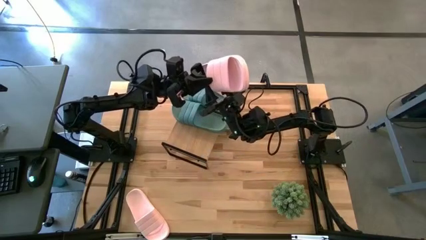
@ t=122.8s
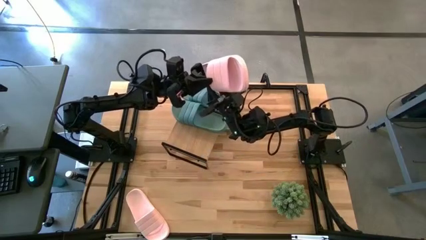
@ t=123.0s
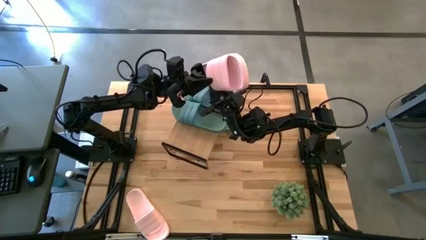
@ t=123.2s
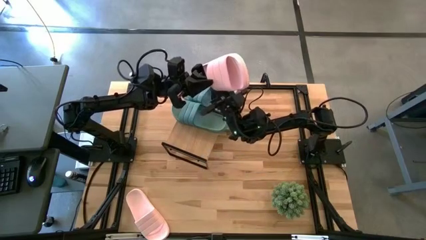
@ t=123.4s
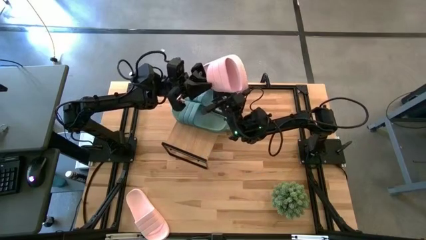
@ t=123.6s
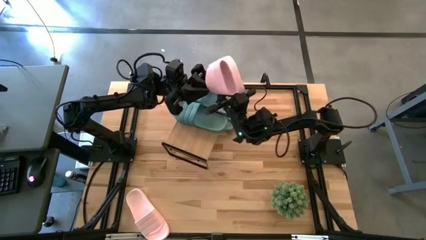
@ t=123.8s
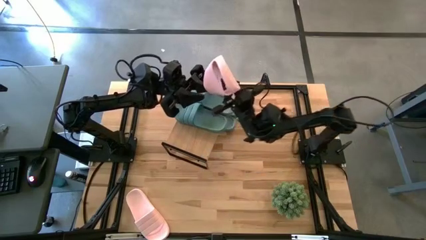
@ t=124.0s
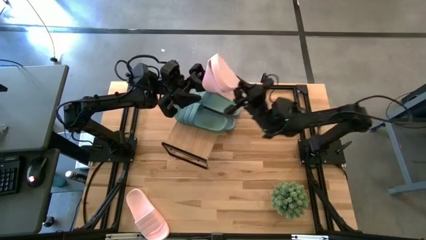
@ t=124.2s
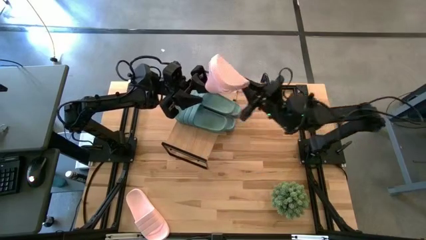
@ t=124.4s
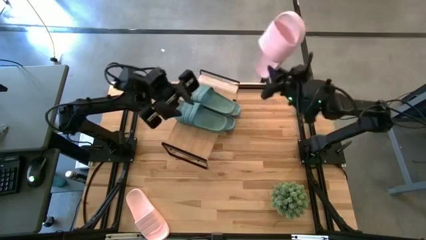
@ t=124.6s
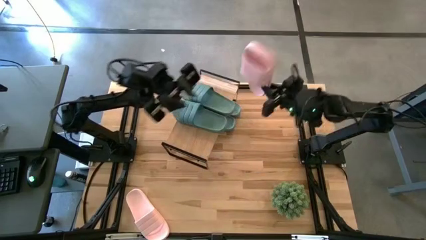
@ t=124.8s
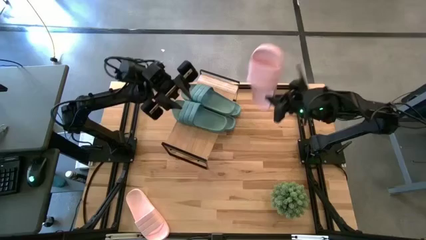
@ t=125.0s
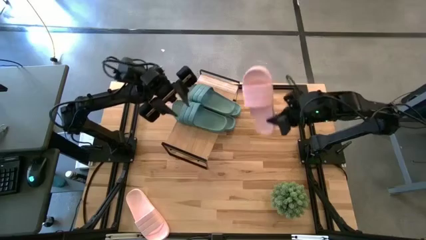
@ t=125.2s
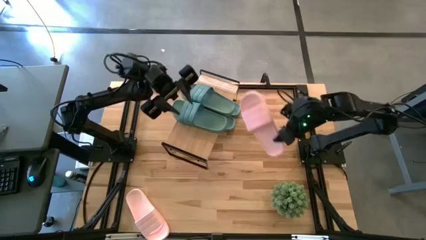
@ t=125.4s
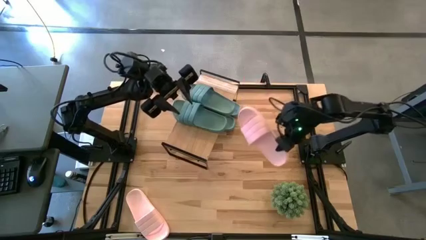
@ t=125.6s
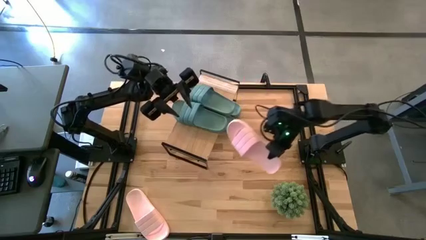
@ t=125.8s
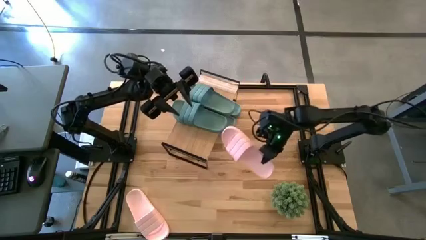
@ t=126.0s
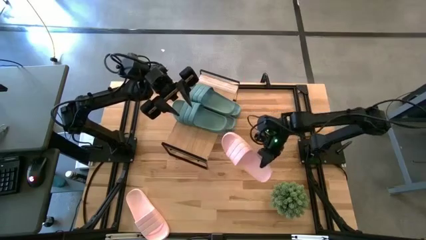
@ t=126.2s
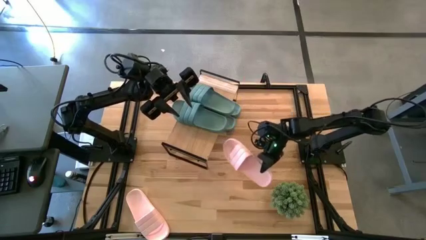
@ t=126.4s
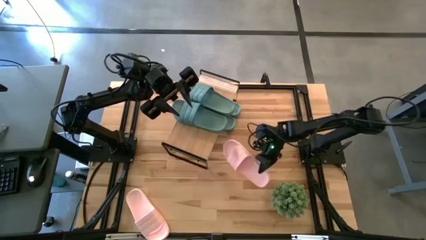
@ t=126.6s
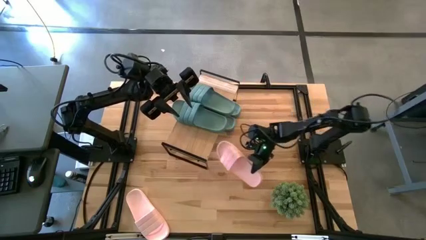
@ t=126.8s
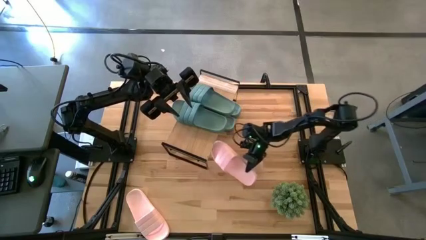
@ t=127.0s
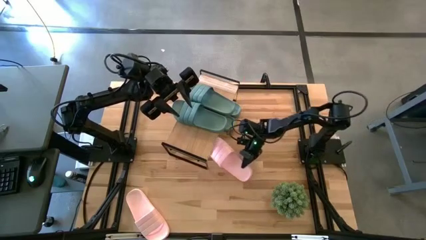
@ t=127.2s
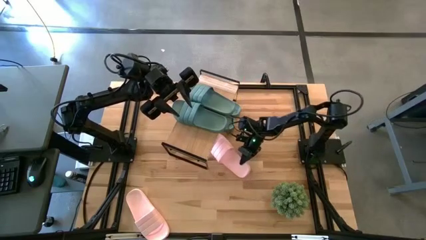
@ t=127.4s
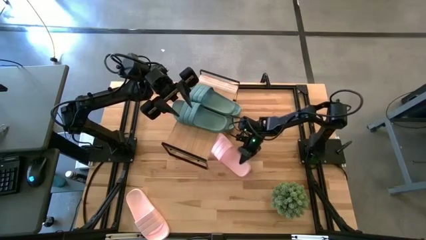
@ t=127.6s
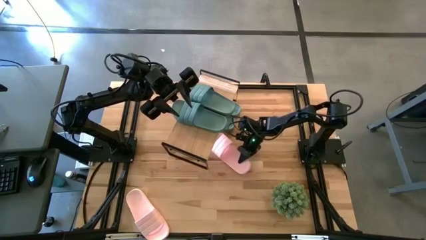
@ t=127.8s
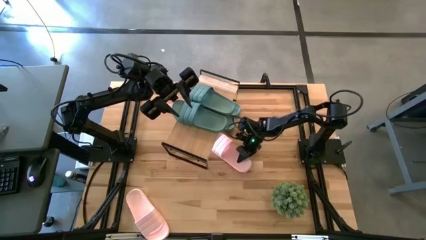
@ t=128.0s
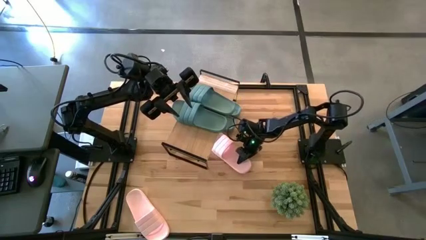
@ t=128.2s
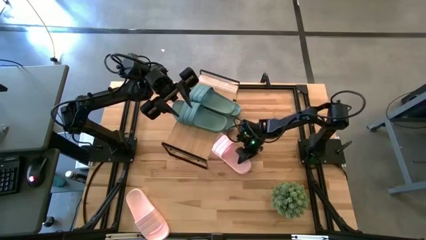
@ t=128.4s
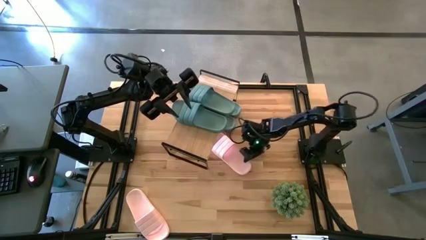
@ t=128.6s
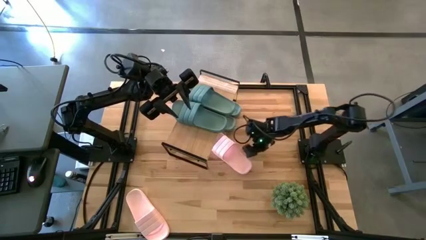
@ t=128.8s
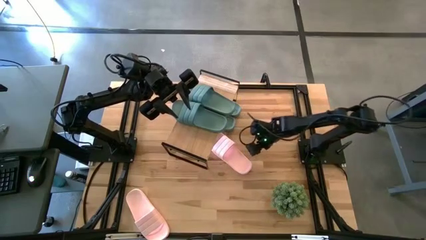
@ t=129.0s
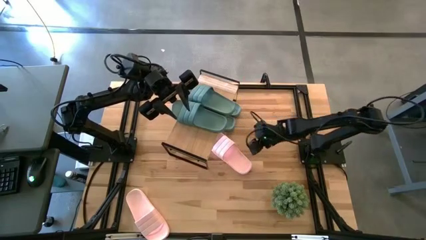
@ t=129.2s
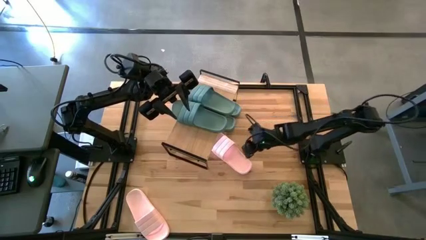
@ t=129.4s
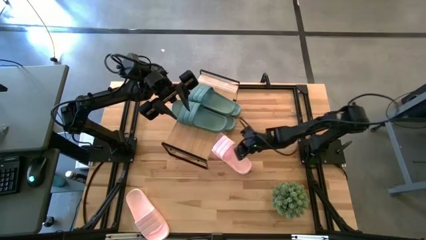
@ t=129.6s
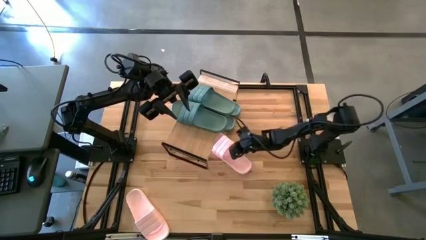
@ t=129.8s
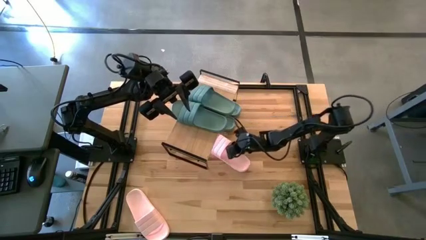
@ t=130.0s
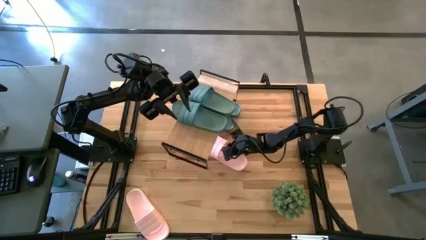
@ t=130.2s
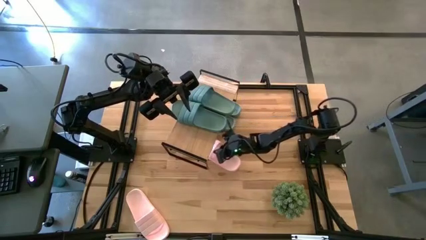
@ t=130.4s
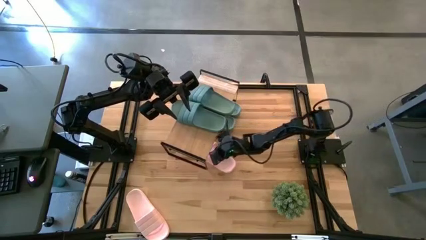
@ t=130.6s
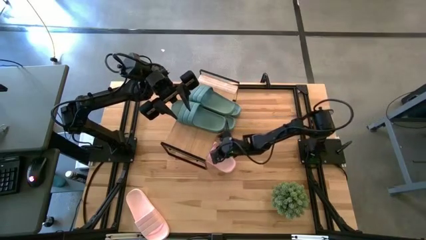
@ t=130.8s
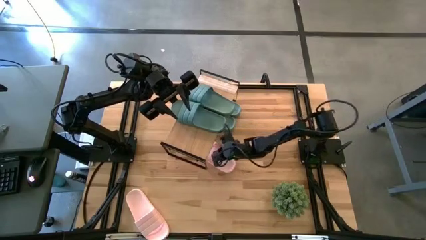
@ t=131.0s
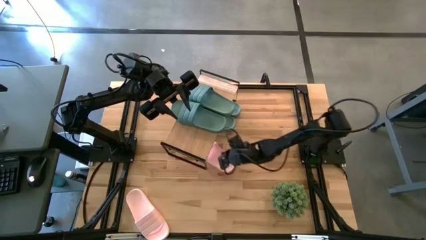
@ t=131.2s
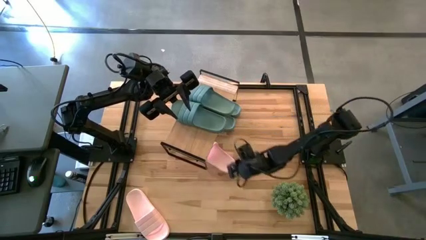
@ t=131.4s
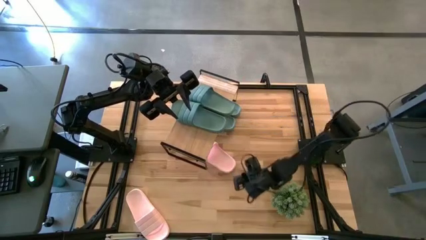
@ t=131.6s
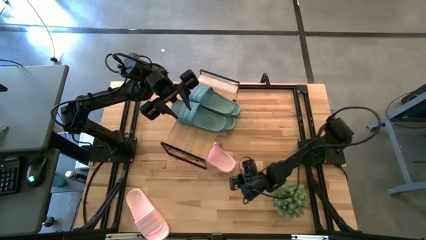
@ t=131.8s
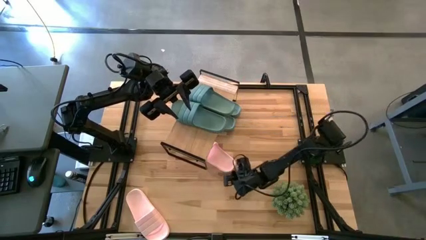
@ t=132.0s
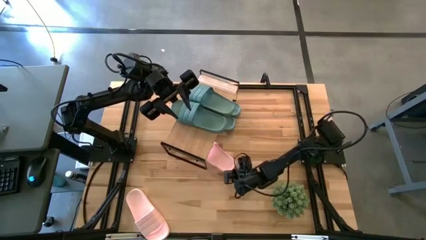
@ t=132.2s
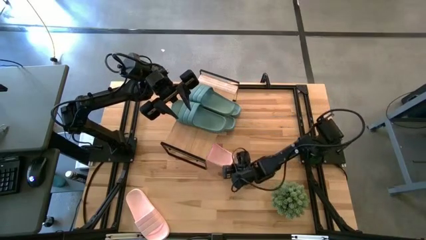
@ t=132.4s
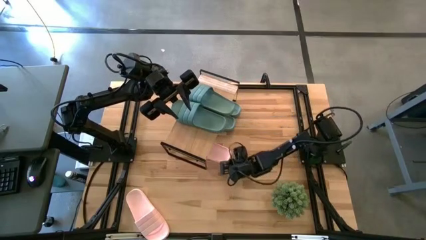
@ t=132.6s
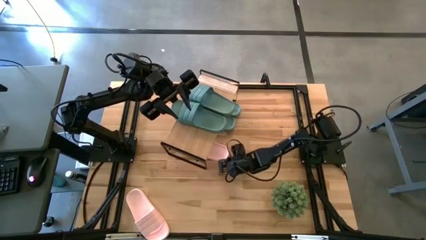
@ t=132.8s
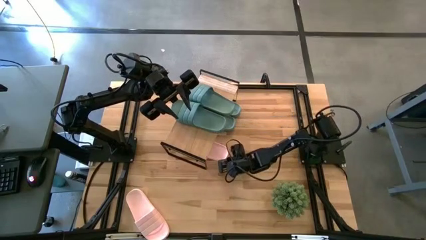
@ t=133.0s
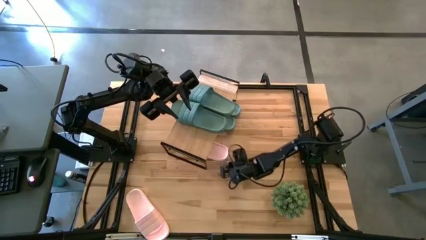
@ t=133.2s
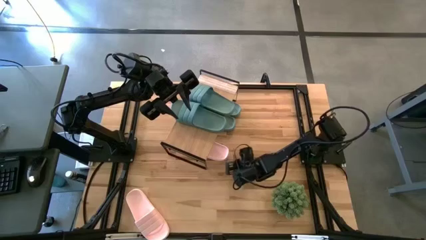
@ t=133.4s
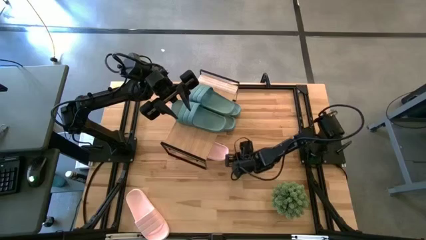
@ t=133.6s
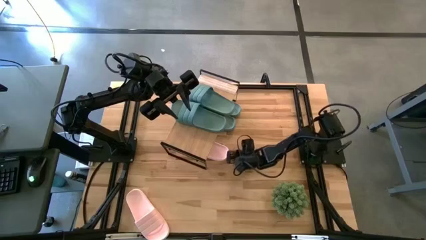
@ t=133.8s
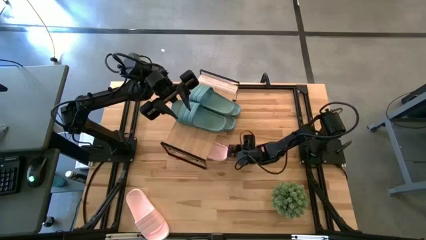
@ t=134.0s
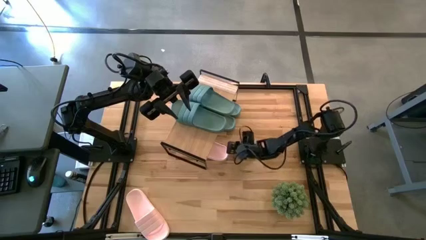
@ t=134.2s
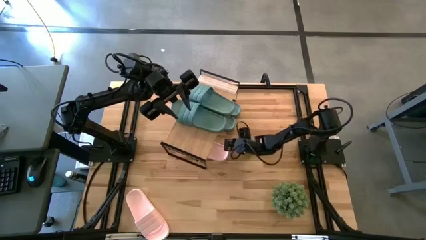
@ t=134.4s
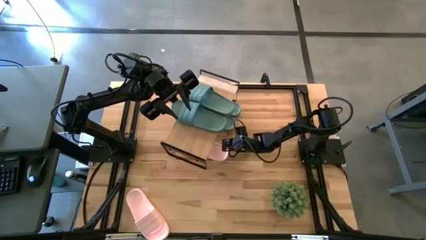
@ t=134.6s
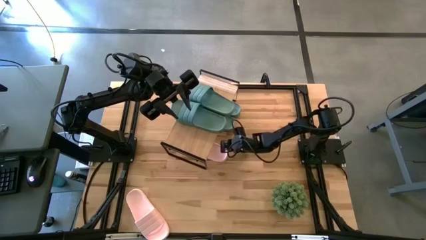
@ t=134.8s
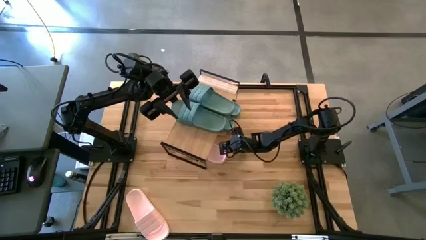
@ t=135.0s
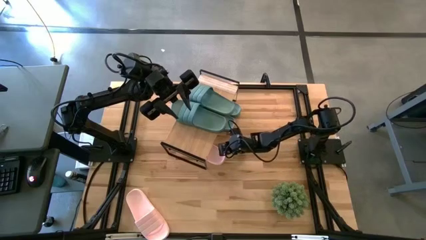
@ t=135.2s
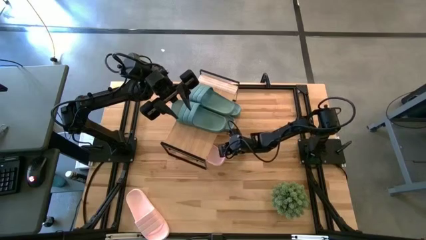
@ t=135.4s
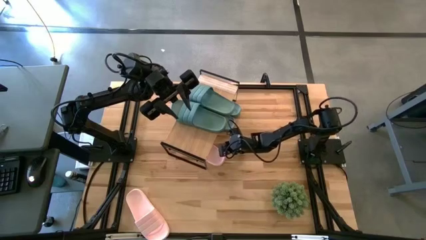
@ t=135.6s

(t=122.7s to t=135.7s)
Task: Pick and place slides into the shelf
Put the pink slide under the shelf

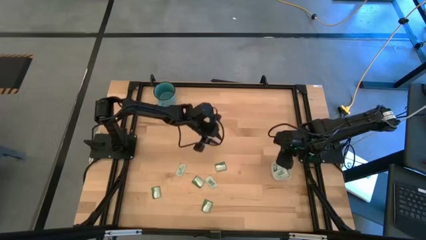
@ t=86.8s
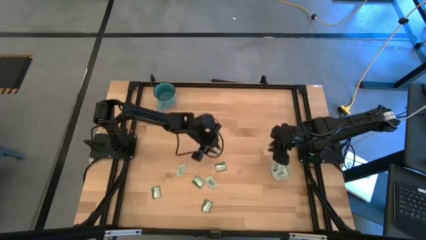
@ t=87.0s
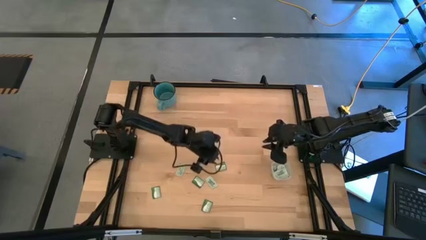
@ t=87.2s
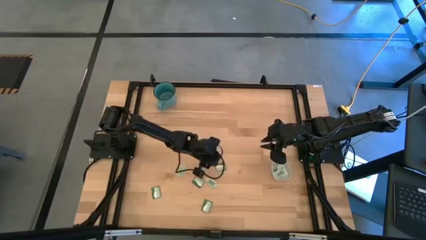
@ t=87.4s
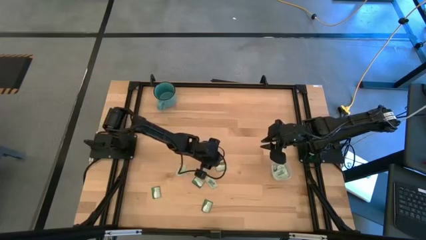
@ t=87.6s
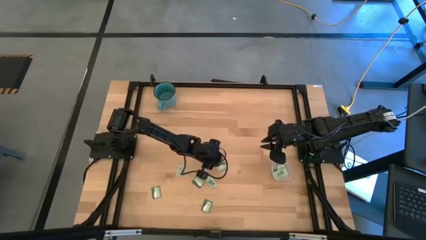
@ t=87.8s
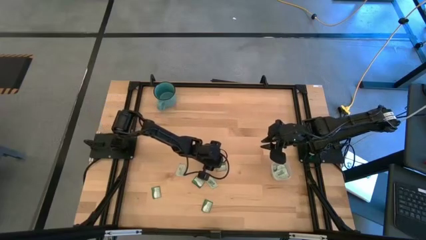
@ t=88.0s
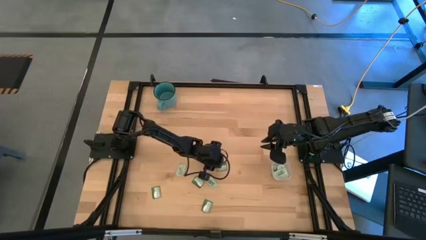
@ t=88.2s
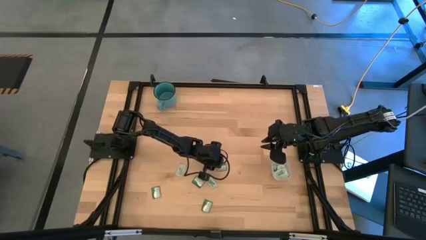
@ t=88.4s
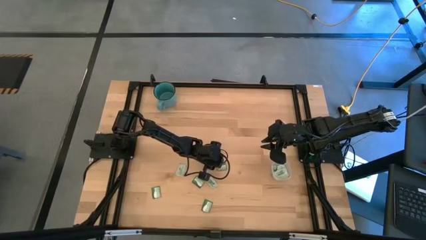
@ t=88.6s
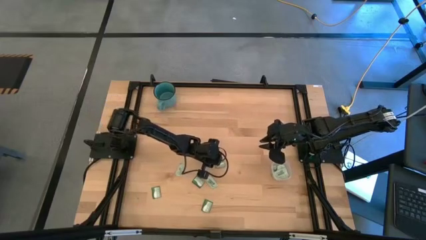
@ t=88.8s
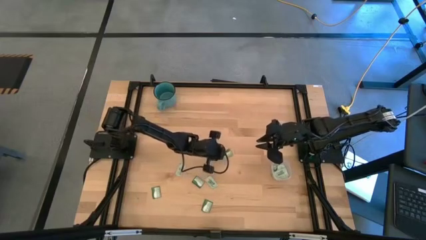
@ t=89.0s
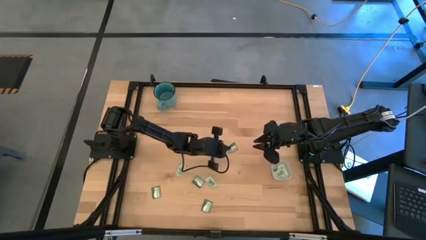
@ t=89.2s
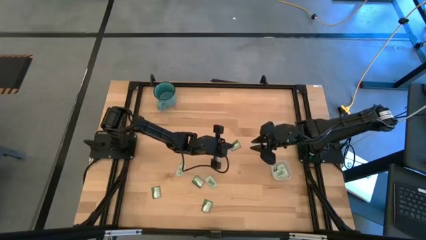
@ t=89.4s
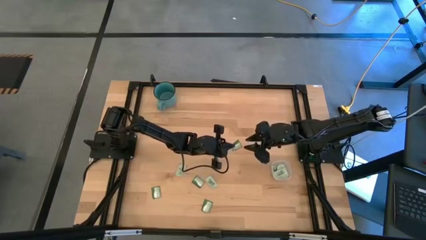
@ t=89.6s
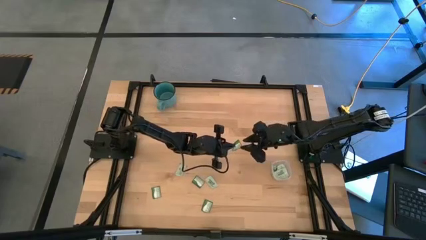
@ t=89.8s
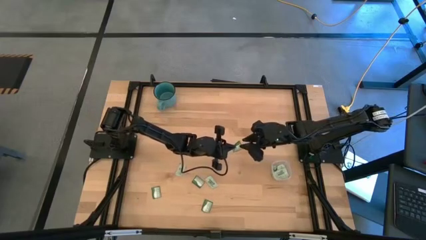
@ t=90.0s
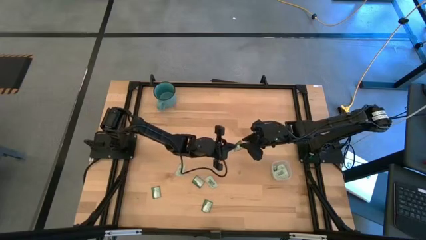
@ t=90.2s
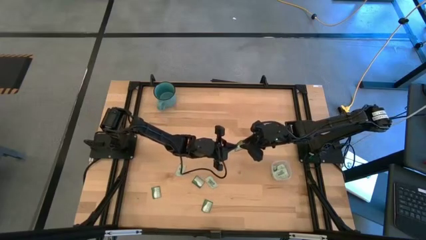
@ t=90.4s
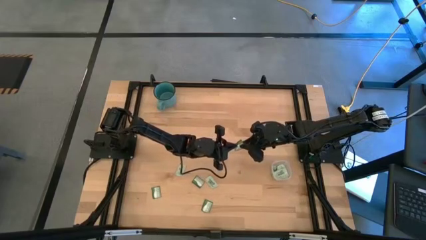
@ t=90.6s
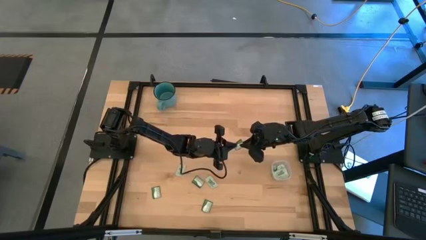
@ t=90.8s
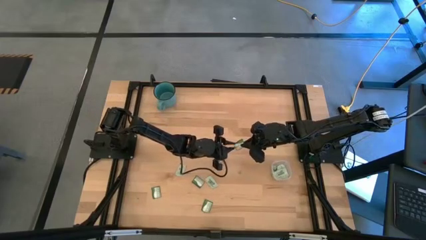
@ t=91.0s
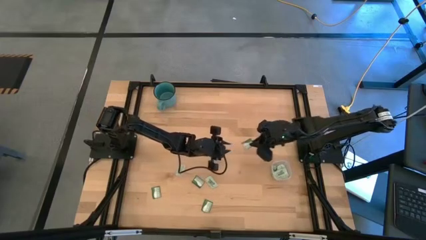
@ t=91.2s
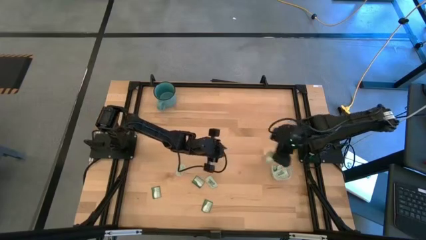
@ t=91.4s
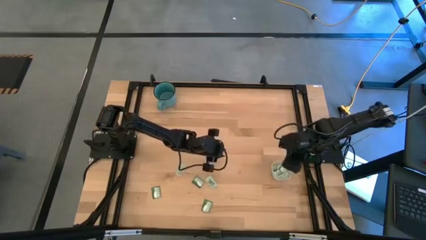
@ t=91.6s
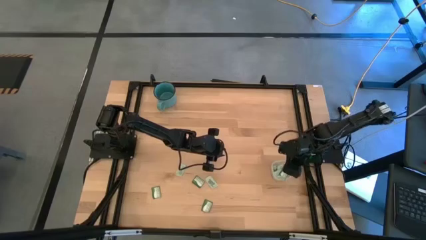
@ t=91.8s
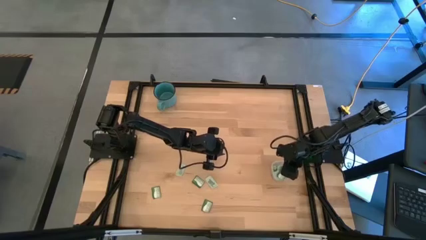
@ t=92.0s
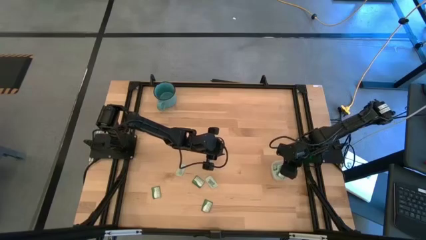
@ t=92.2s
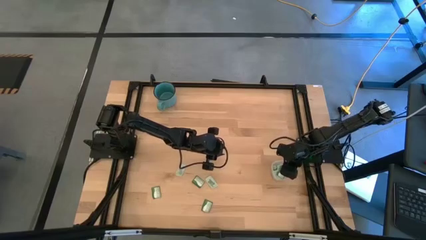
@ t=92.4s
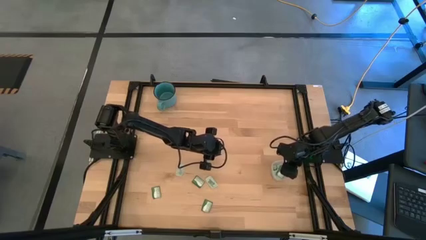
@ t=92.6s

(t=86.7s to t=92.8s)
Task: Pick and place items into bin
Put the green stevia packet into the transparent bin
